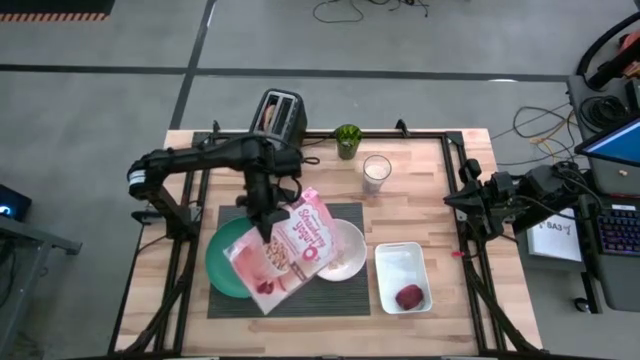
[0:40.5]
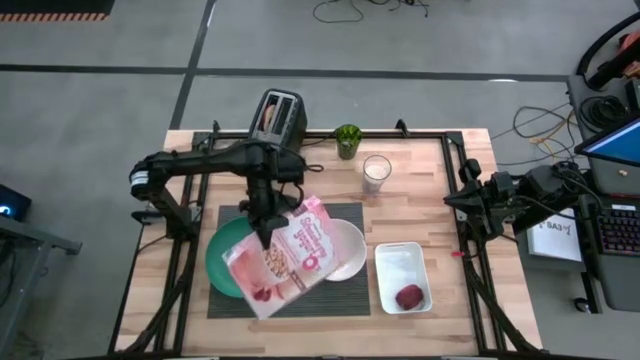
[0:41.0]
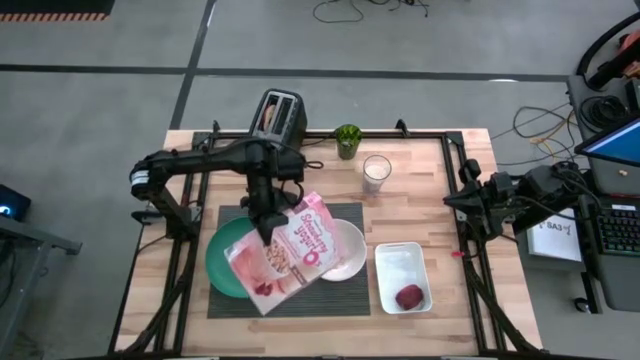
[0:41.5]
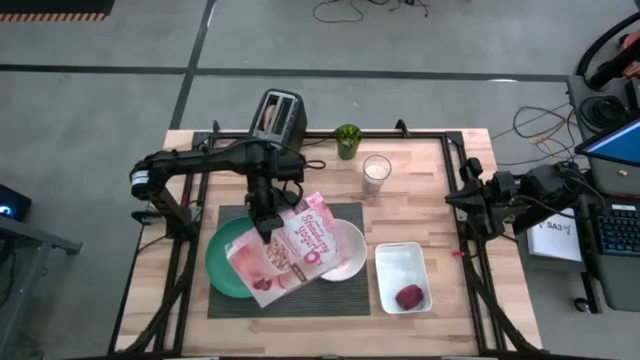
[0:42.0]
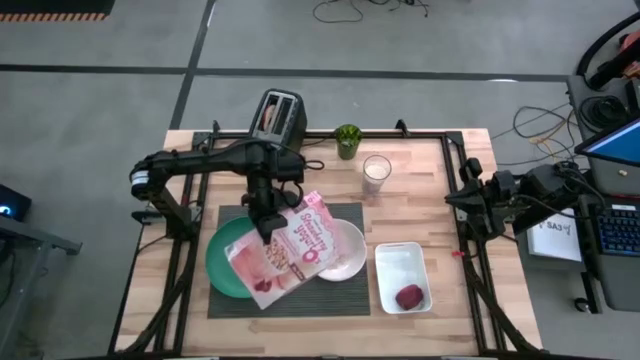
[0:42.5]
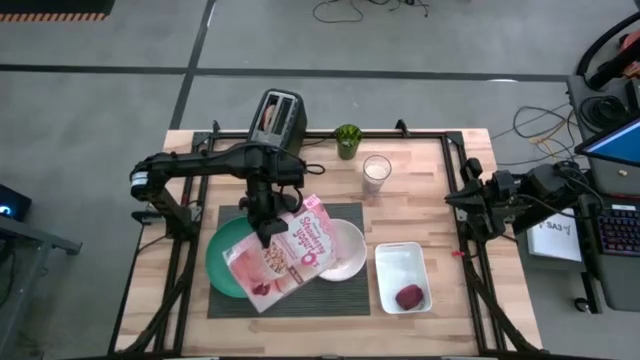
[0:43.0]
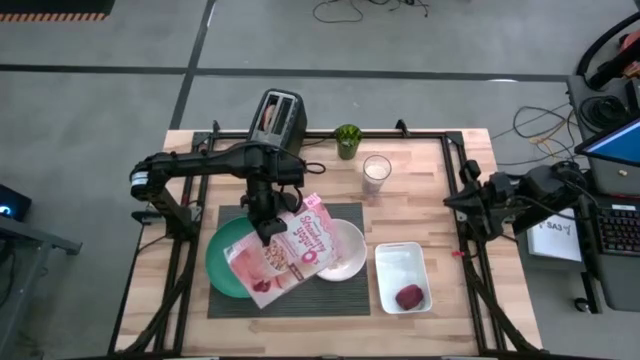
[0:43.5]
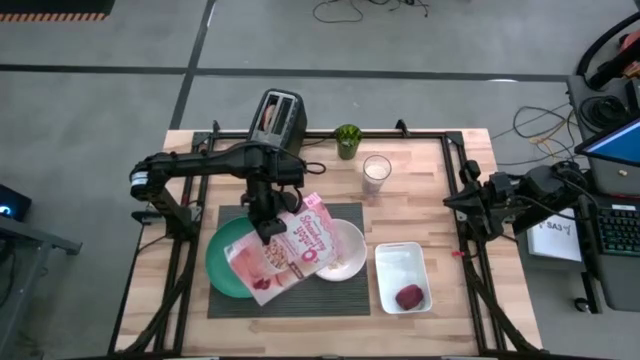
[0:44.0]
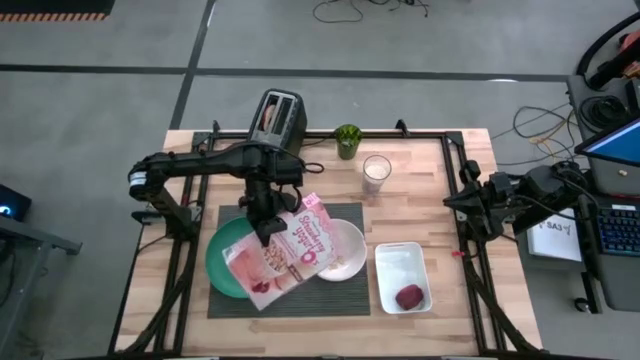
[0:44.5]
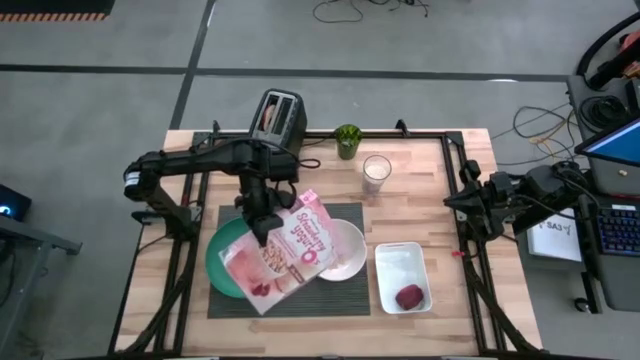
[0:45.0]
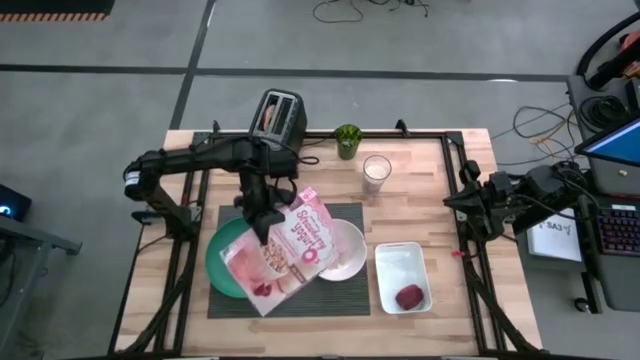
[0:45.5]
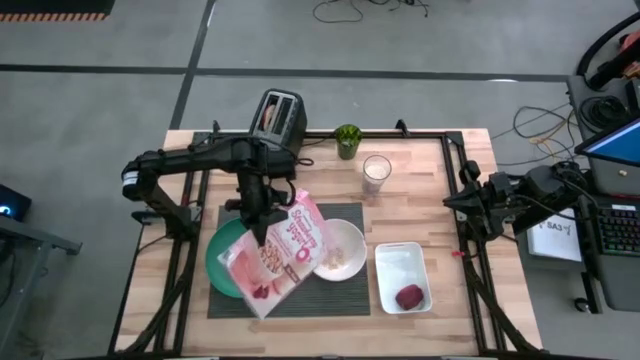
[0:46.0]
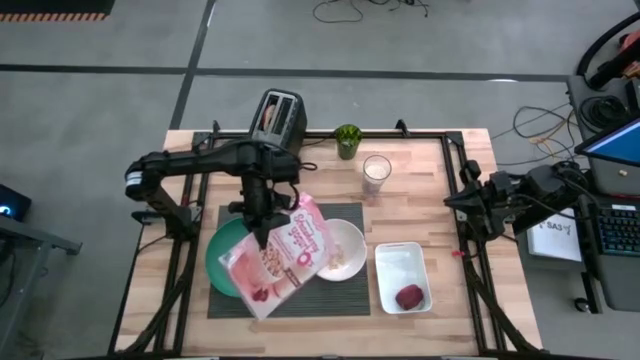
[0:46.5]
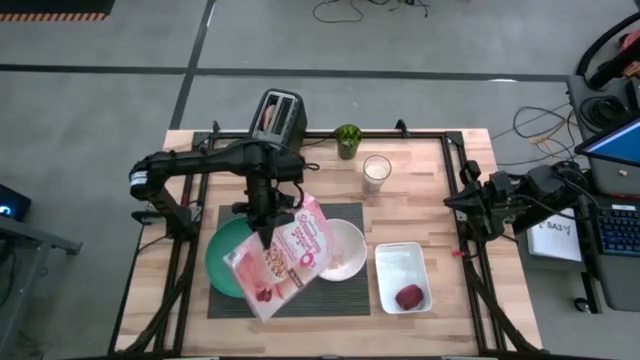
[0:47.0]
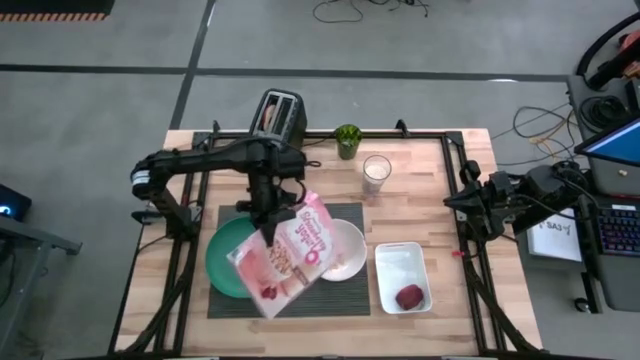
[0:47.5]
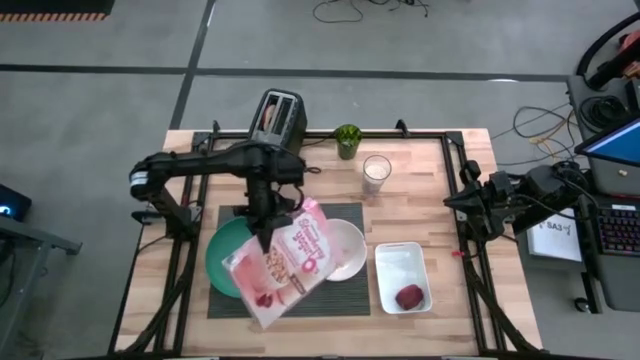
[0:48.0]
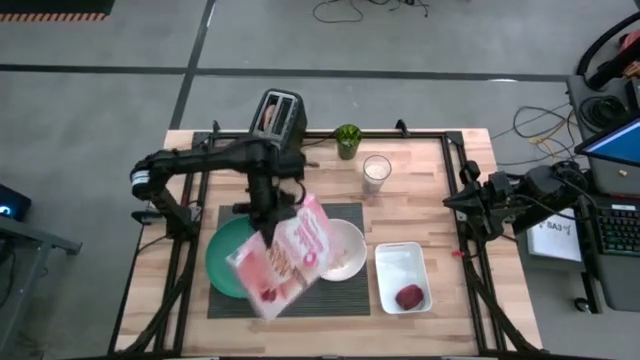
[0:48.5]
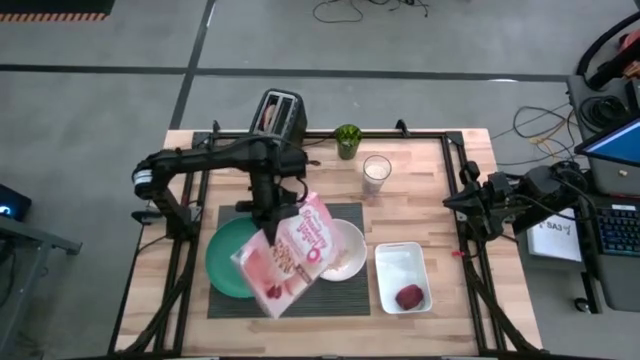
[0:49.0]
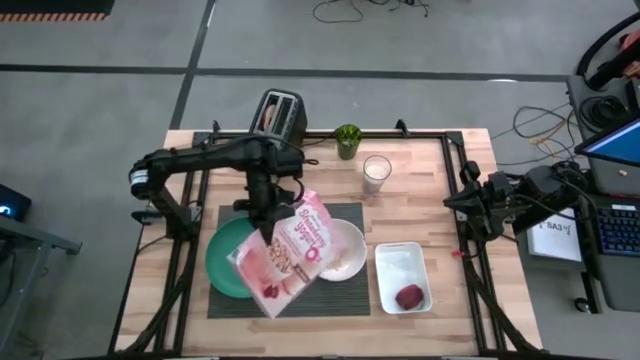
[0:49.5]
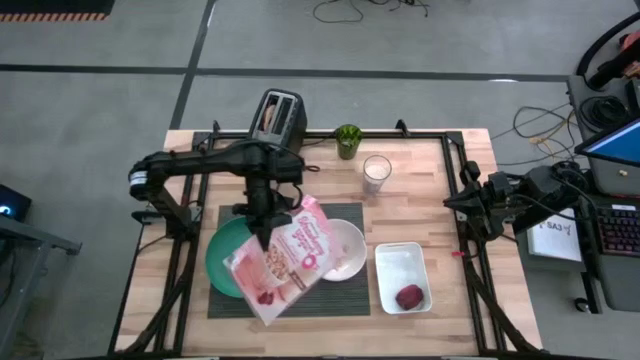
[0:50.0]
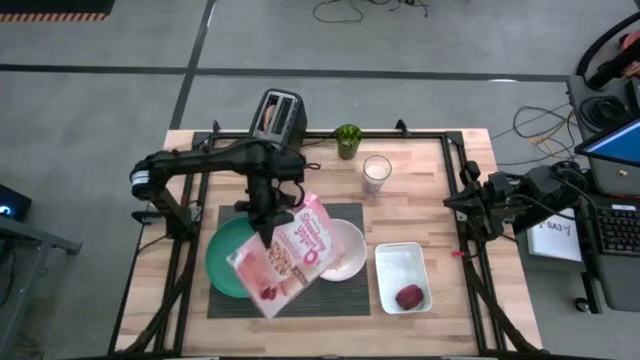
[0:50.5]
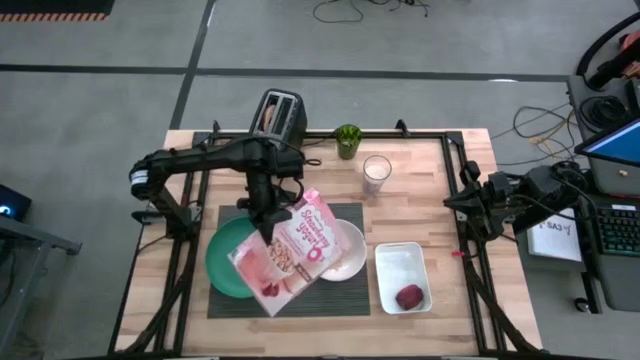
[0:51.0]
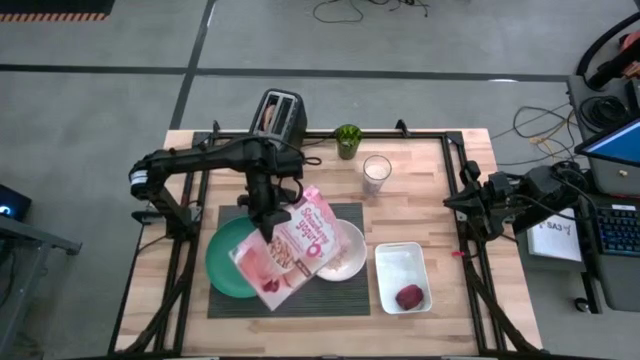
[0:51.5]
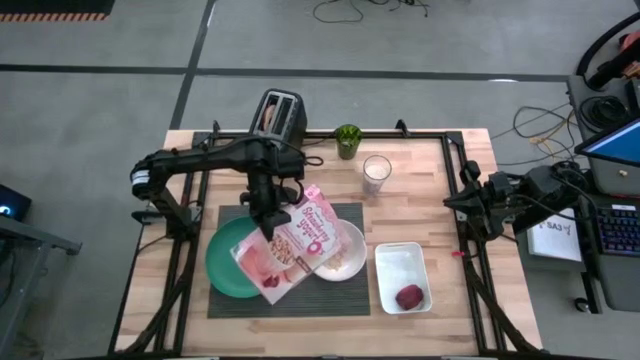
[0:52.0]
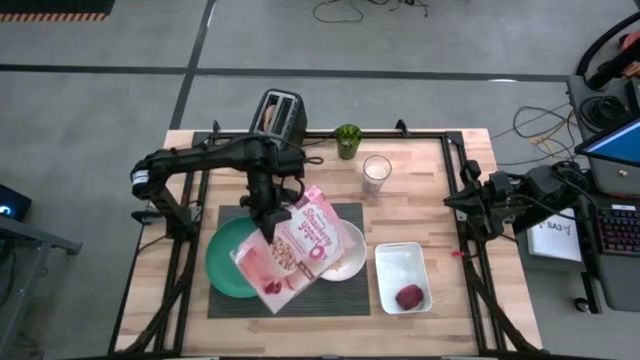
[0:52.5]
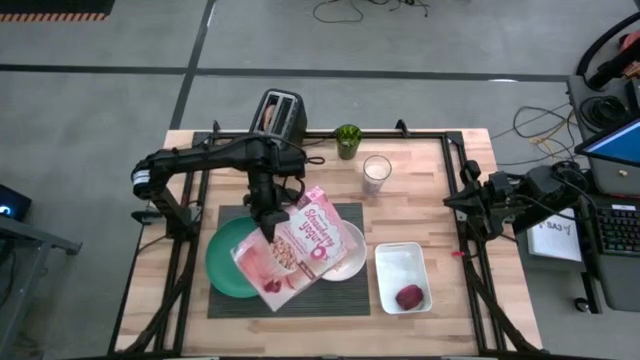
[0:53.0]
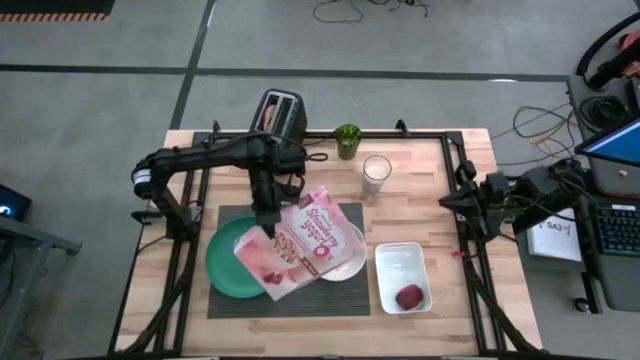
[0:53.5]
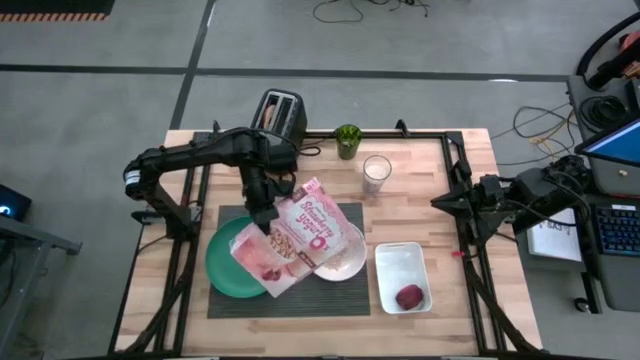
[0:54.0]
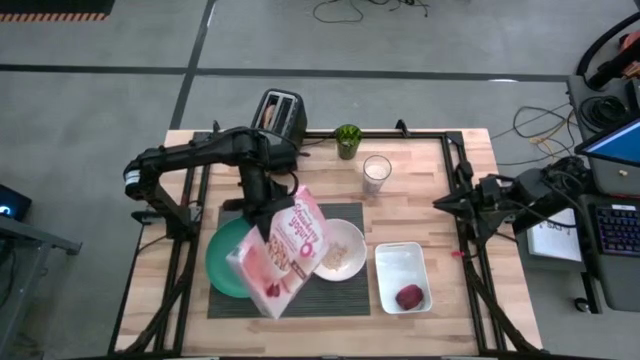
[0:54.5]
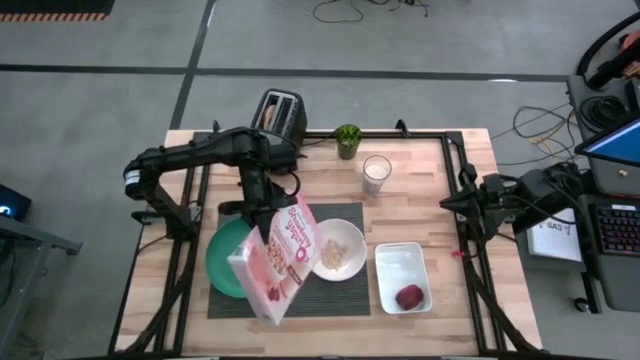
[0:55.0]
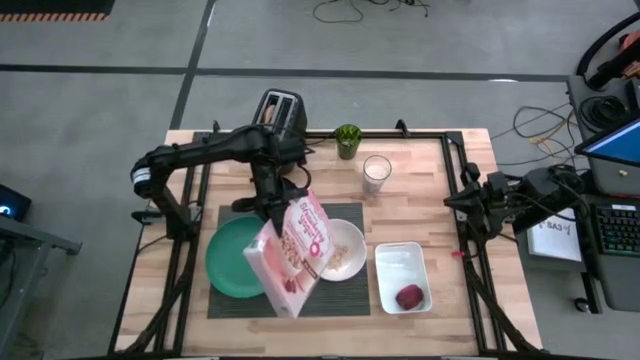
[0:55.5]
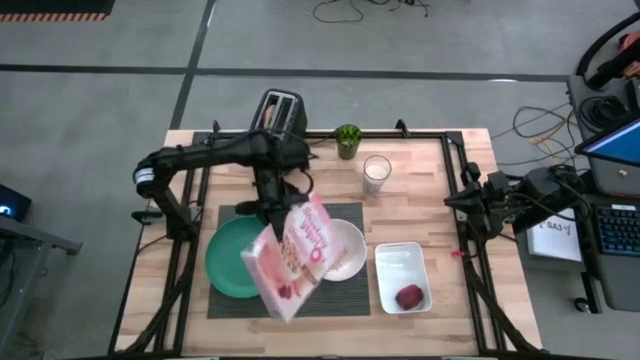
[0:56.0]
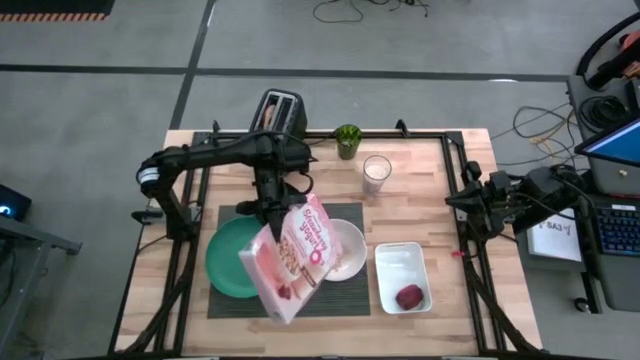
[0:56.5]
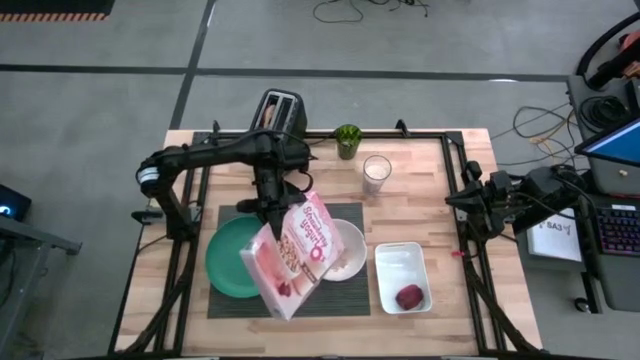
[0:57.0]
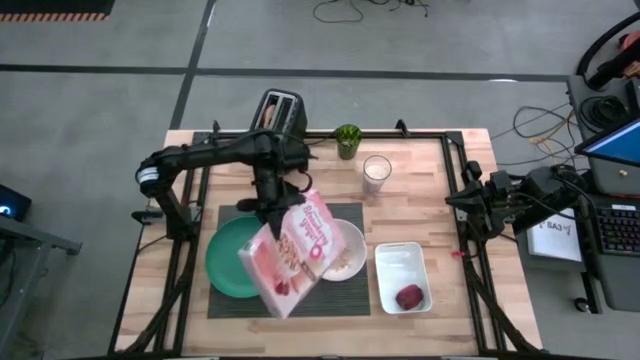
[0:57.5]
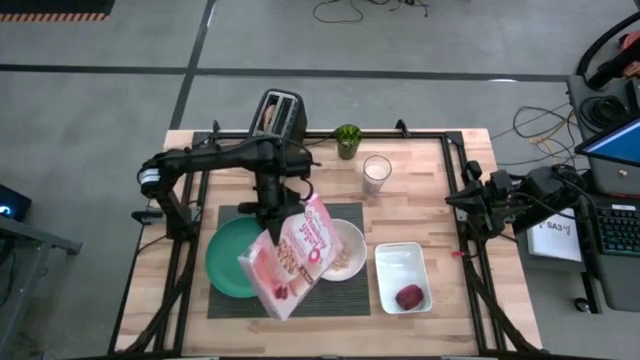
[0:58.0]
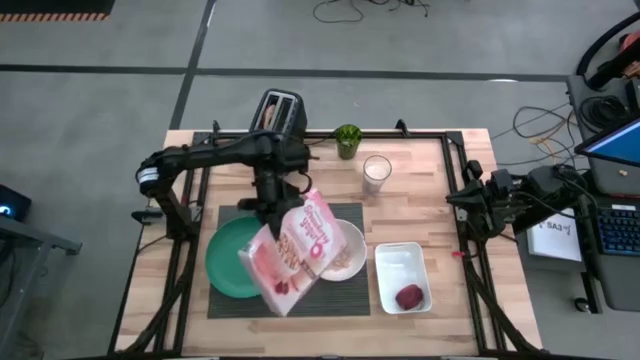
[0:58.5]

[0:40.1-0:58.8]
Task: Arrange a breakfast setting
Pour the cereal into the white bowl

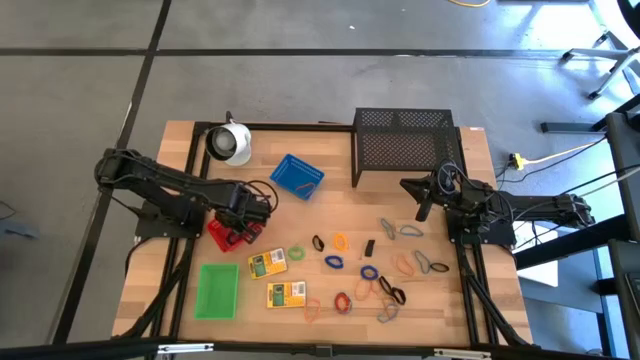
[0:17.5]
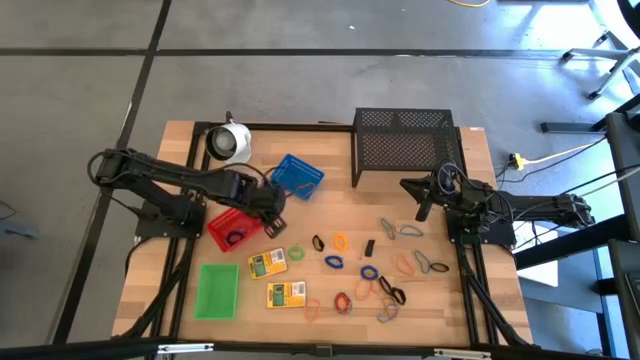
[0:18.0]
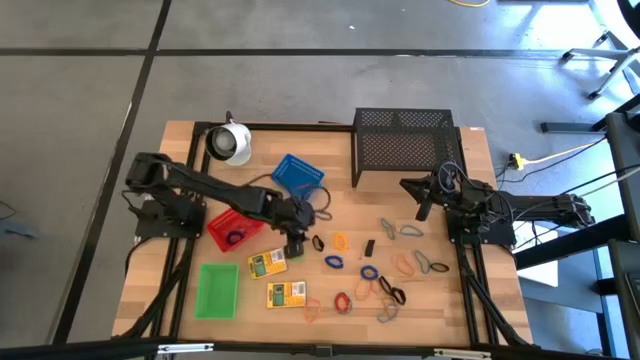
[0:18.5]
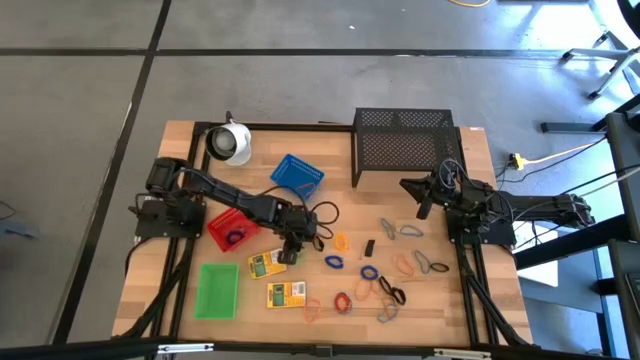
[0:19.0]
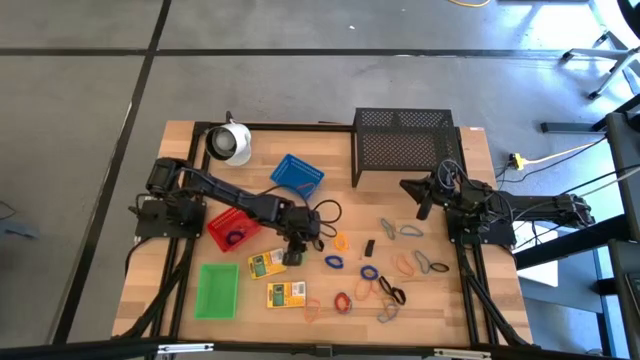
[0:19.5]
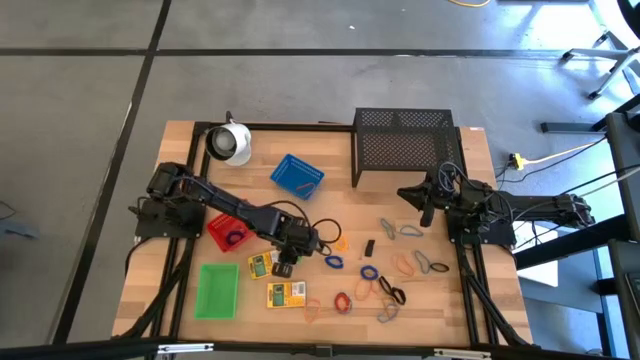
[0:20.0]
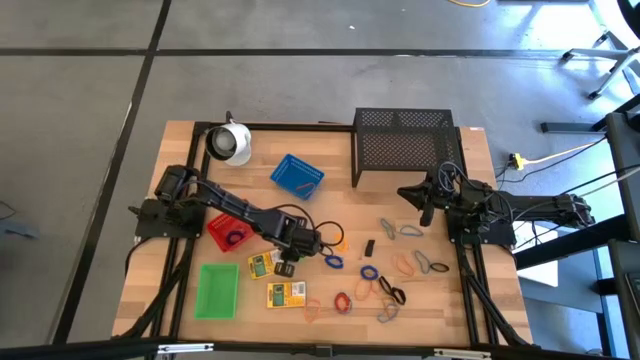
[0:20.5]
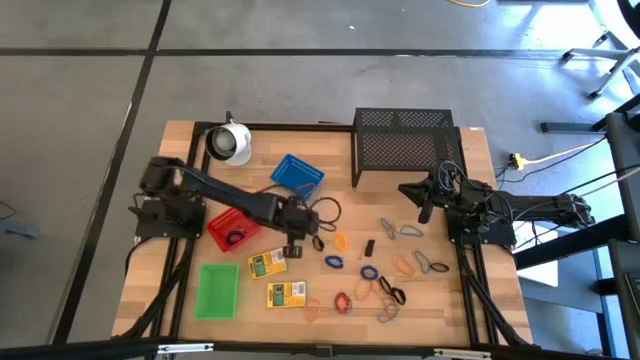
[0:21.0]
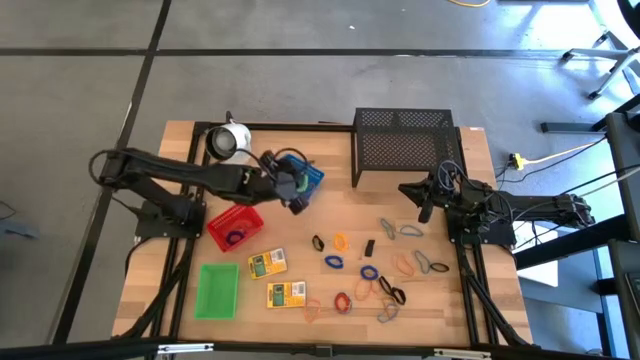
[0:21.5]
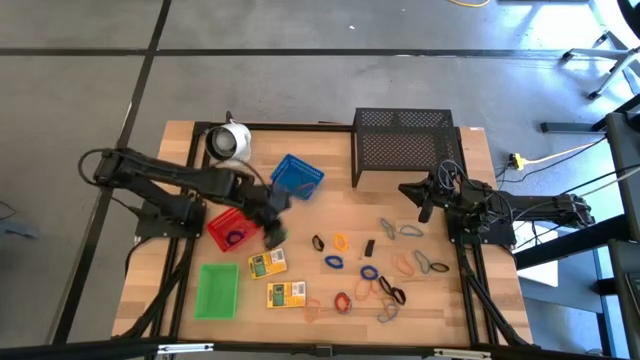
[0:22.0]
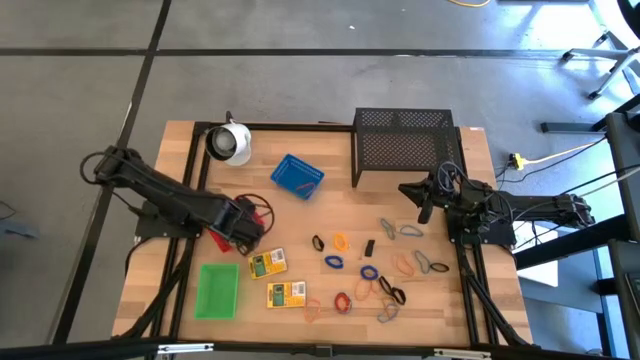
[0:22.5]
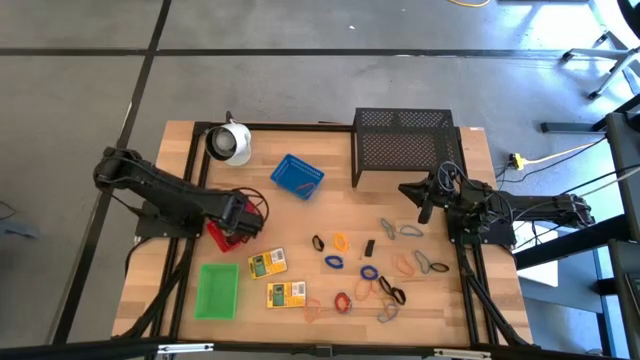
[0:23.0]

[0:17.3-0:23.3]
Task: Pick & Place Office Desk Supplies
Put the green spring keychain into the red bin
